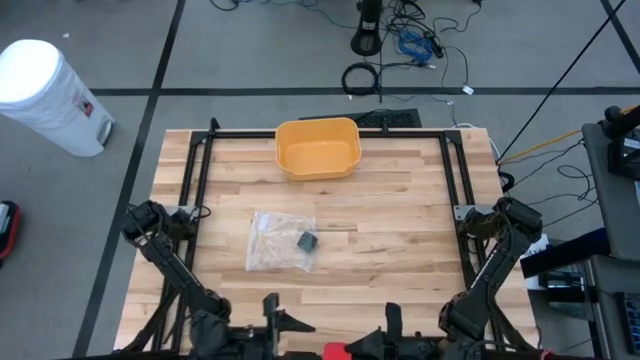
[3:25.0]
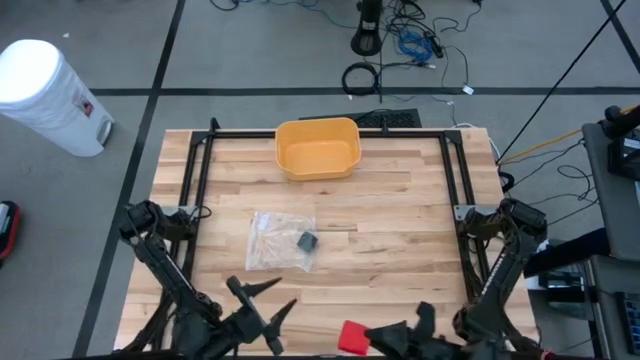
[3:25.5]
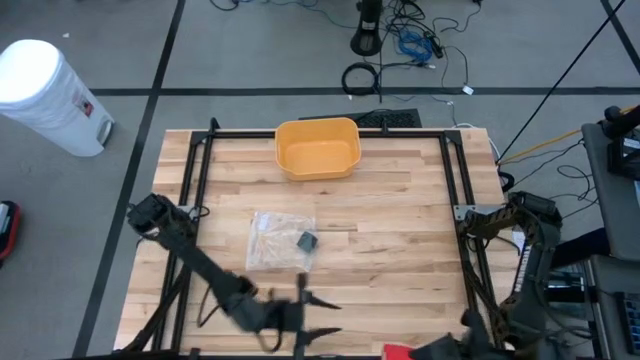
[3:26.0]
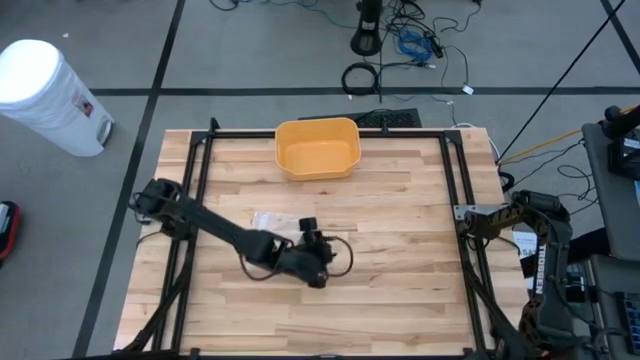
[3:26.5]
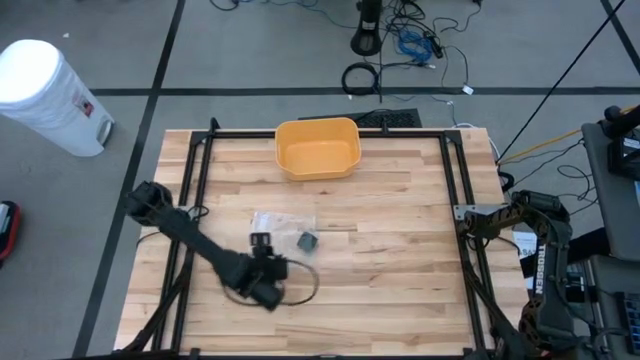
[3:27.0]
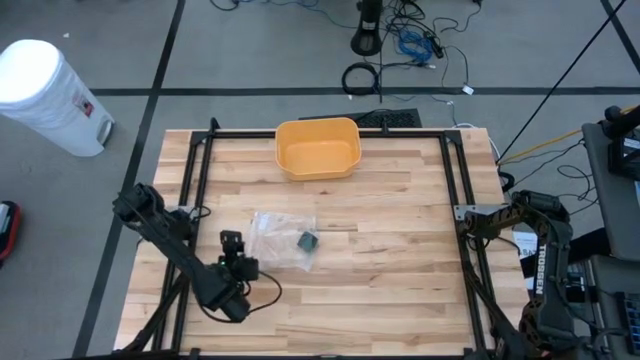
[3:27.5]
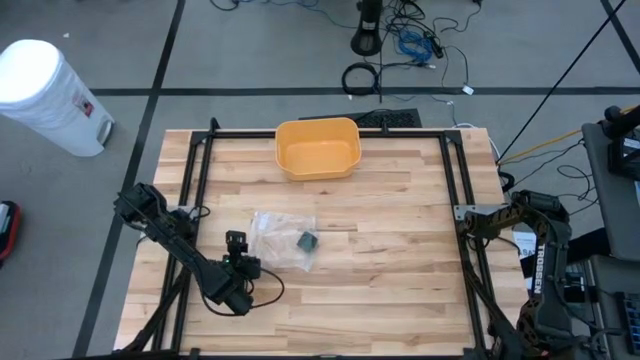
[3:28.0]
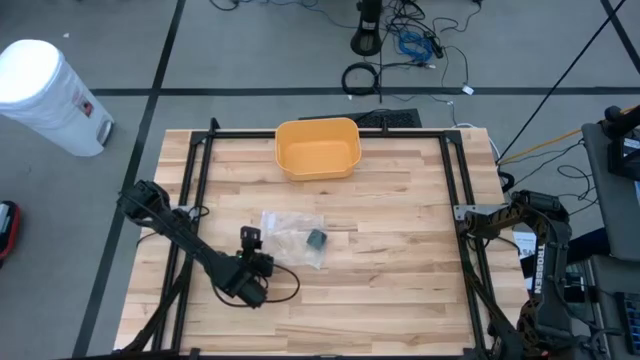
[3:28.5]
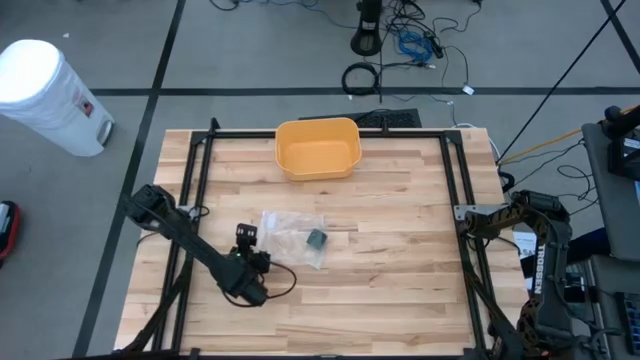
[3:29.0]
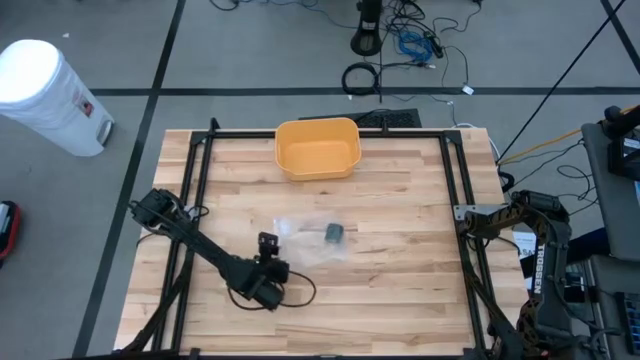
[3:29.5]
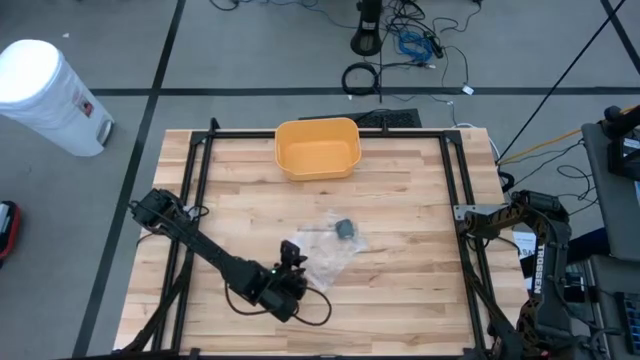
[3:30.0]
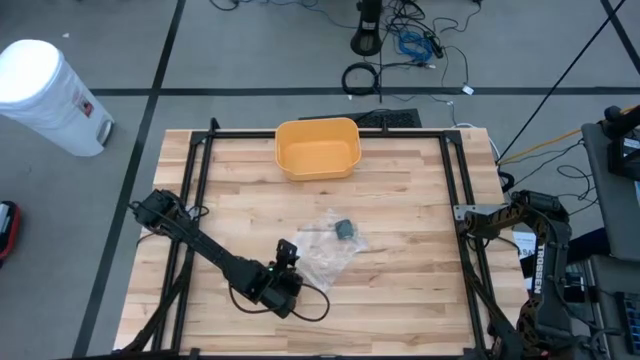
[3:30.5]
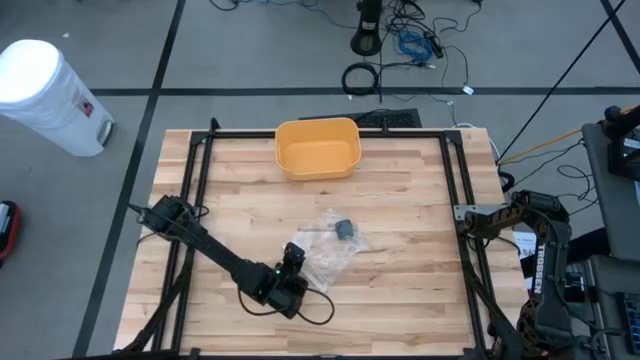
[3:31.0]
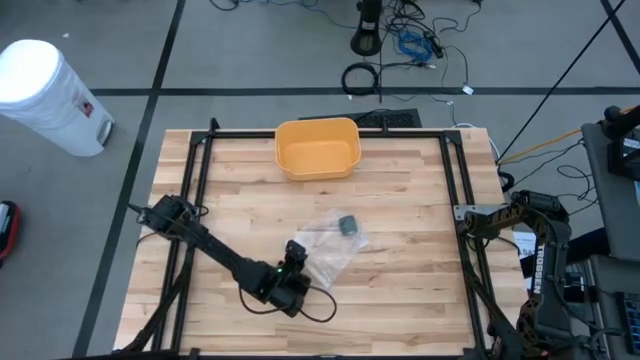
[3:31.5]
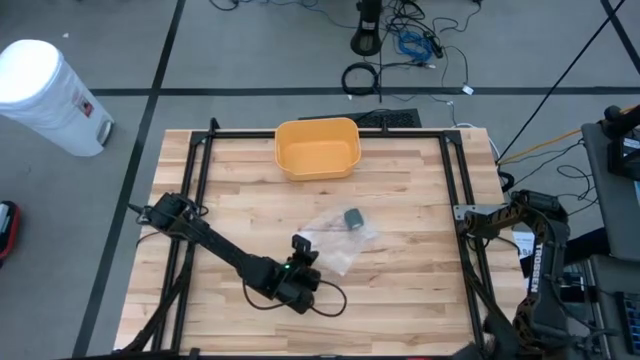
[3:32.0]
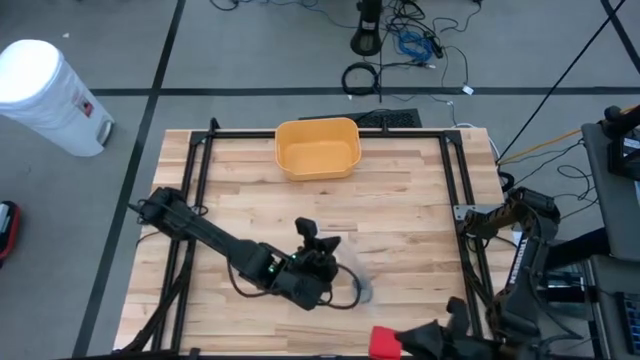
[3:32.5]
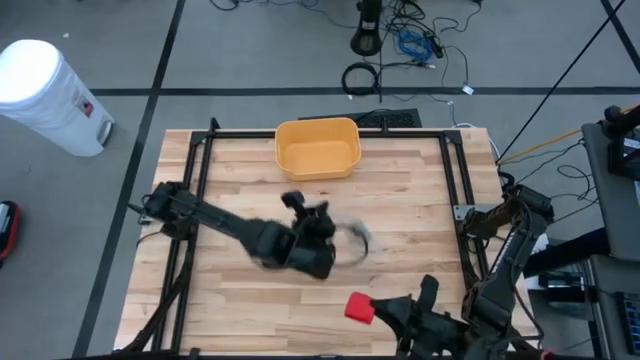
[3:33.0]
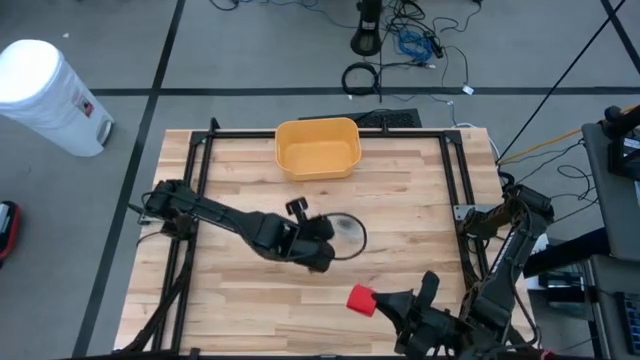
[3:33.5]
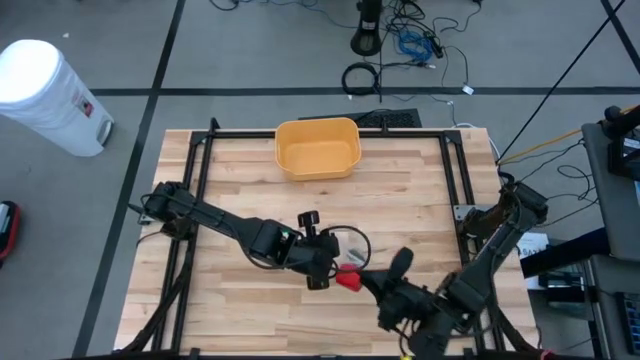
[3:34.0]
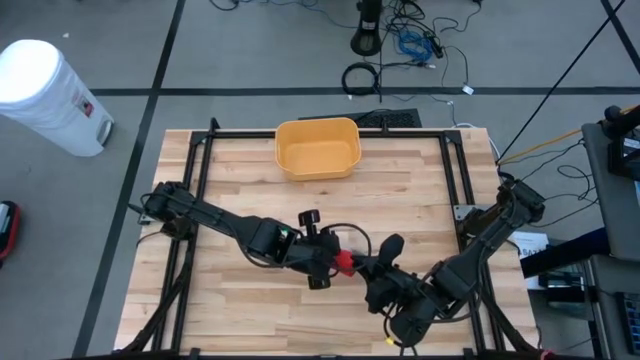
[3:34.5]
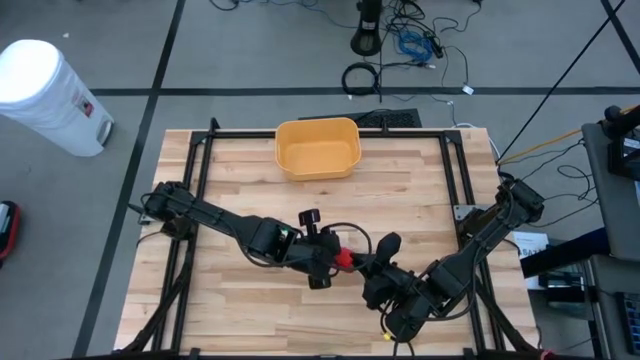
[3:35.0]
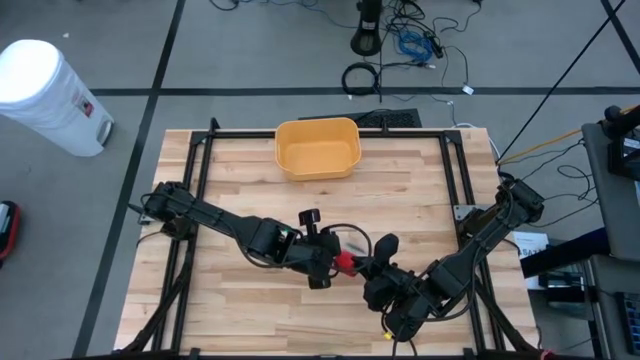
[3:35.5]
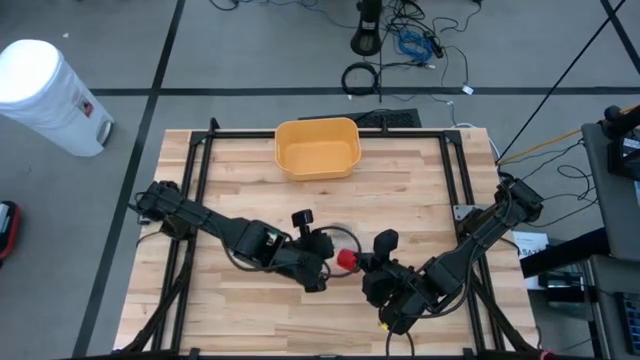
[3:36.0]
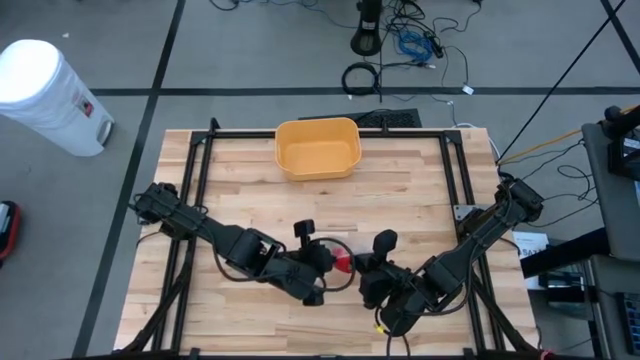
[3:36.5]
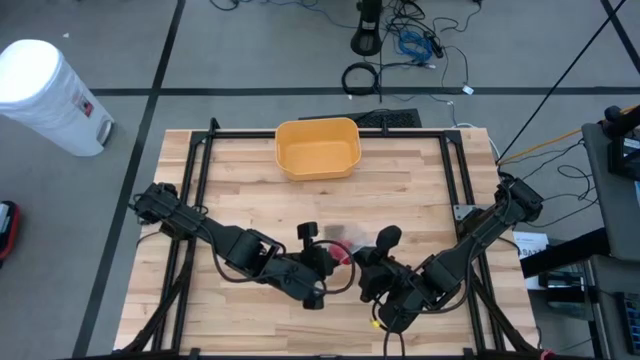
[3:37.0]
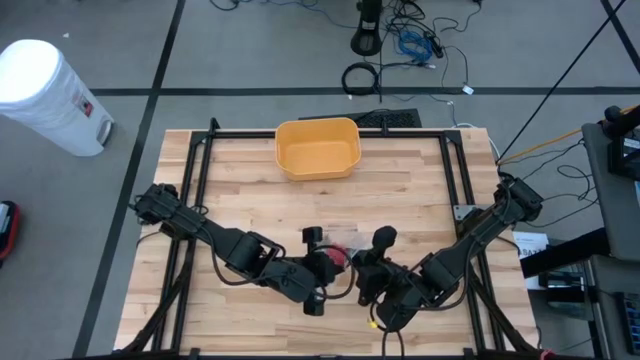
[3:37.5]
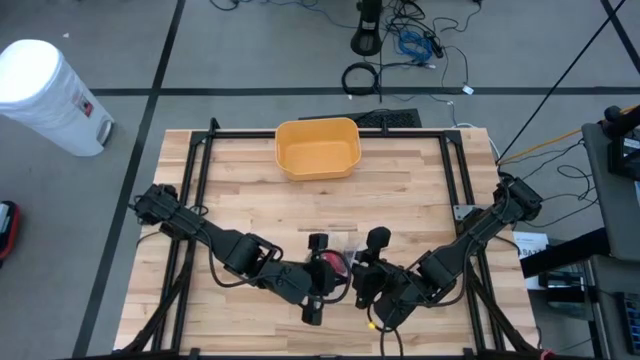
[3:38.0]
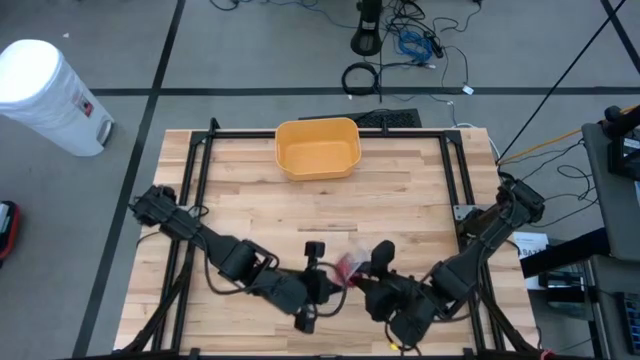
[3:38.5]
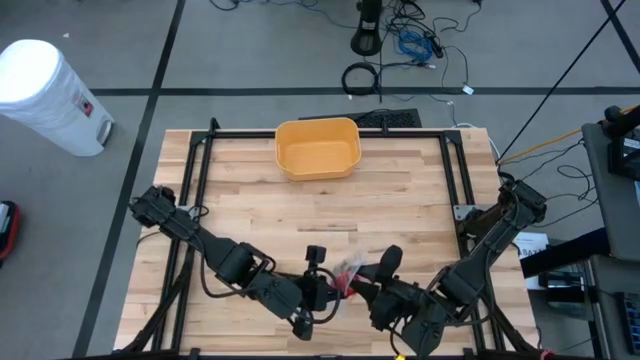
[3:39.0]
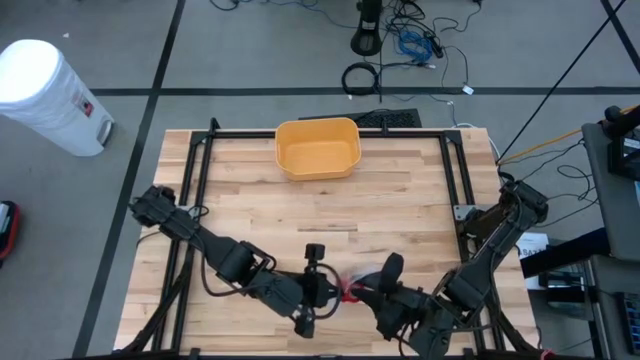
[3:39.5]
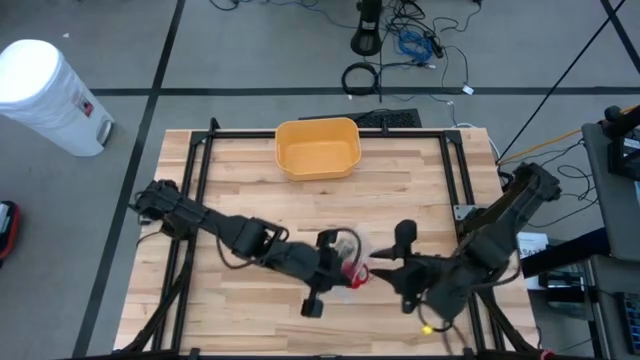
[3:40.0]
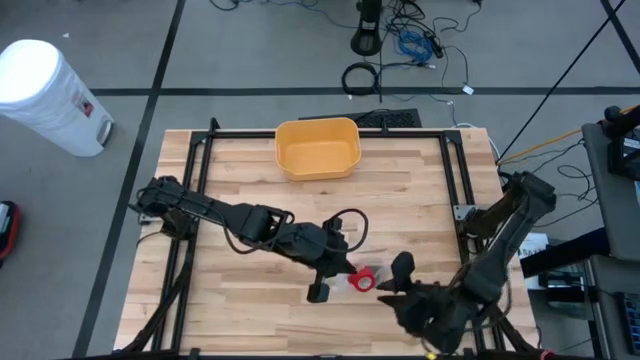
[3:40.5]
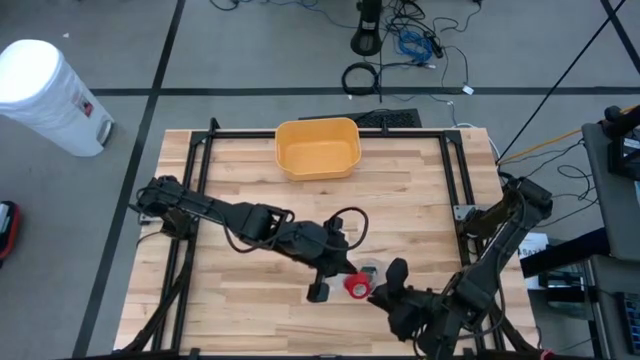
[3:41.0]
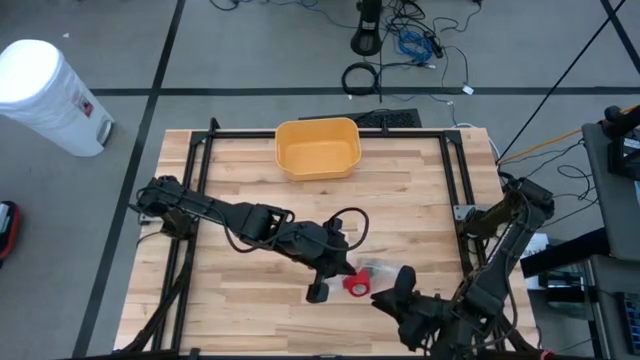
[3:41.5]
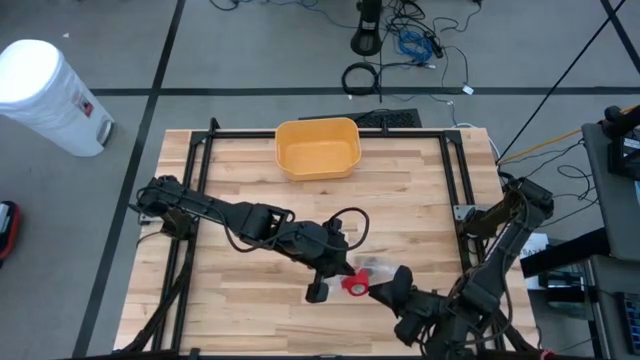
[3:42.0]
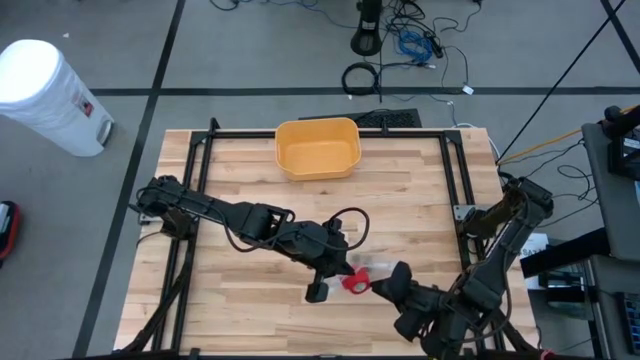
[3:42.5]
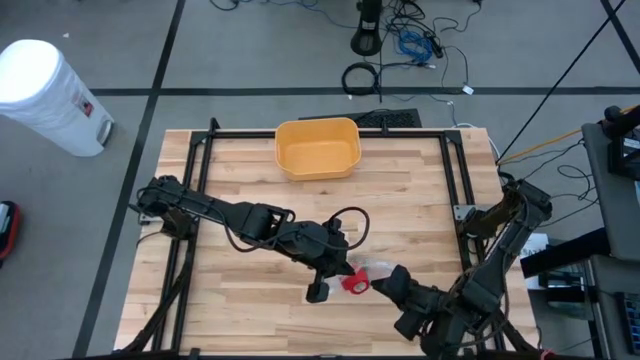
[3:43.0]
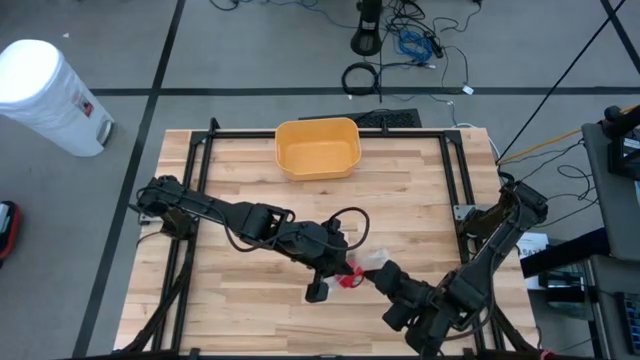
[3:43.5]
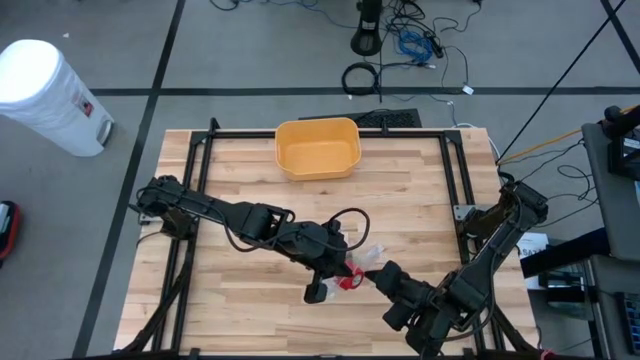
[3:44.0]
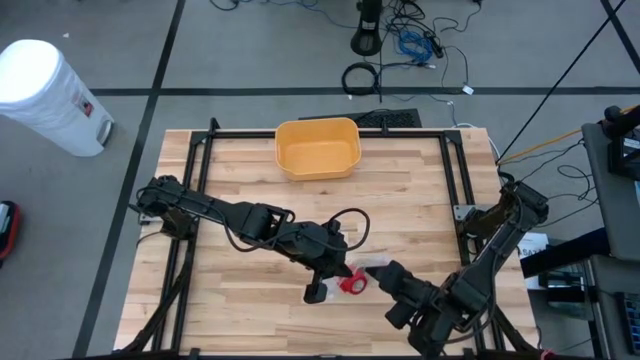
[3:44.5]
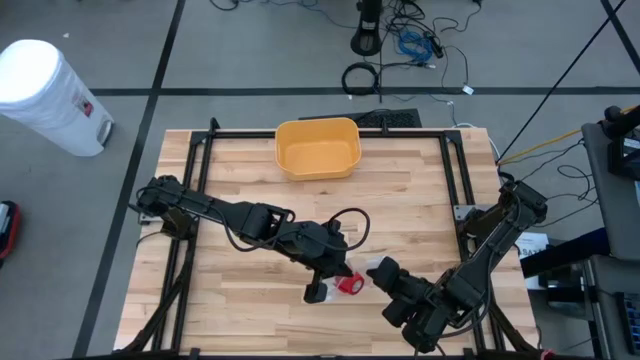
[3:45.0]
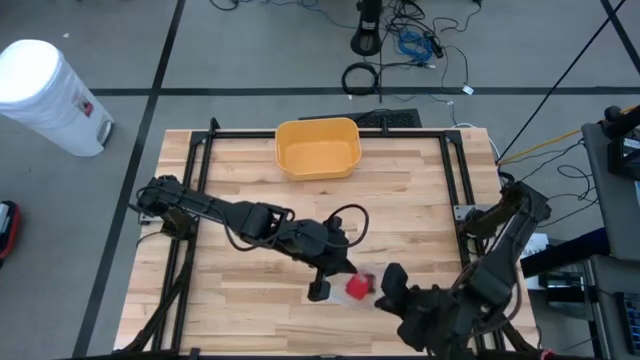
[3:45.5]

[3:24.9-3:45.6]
Task: Roll bandage
Put the red bandage into the transparent zip bag
